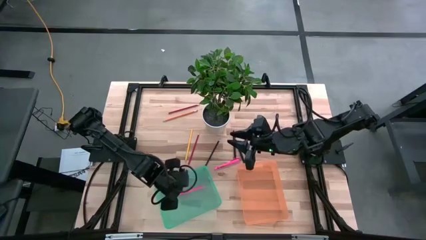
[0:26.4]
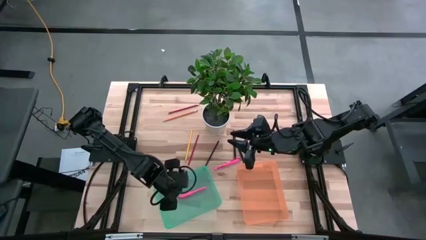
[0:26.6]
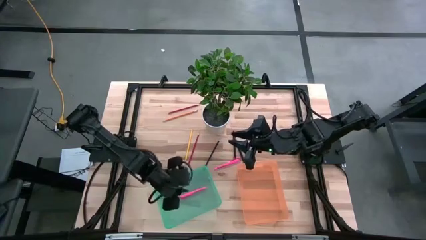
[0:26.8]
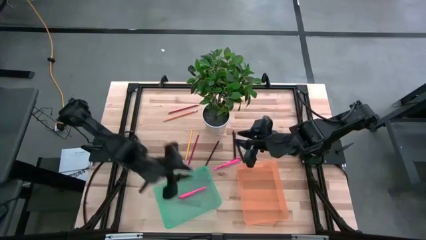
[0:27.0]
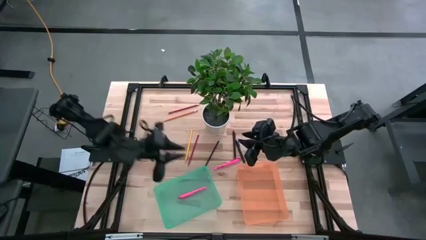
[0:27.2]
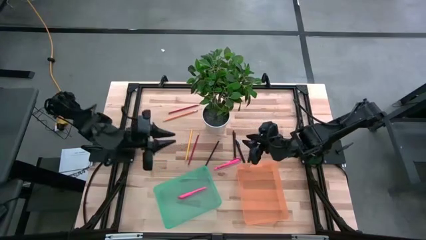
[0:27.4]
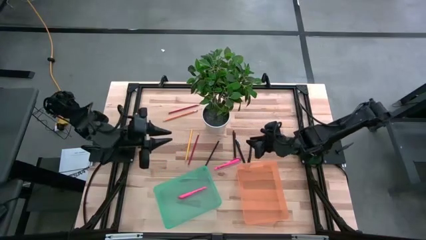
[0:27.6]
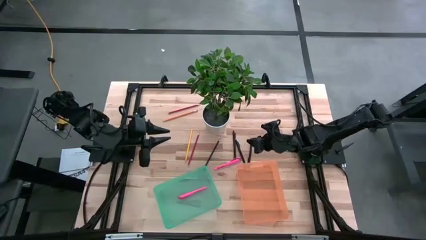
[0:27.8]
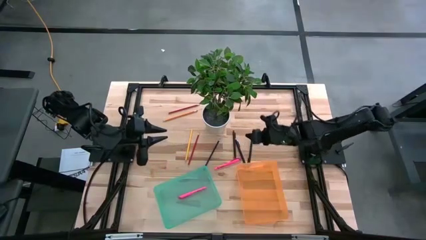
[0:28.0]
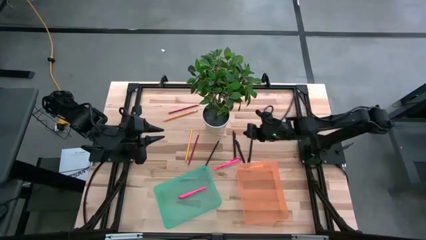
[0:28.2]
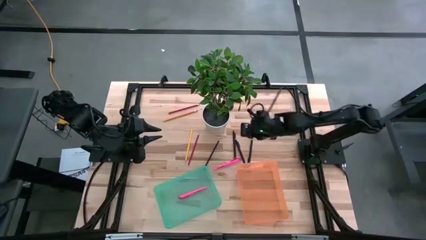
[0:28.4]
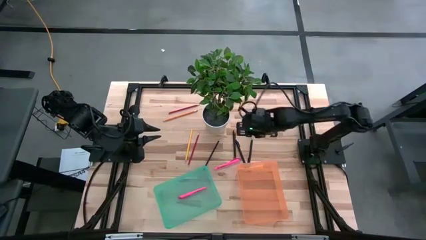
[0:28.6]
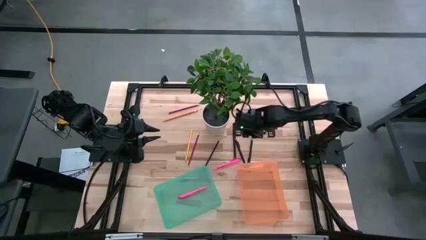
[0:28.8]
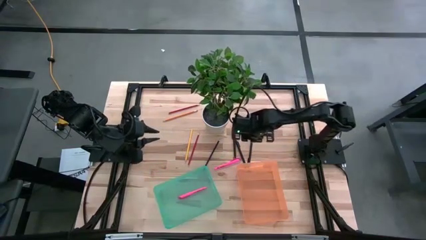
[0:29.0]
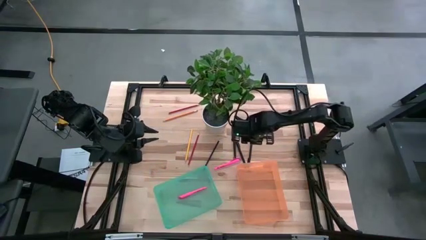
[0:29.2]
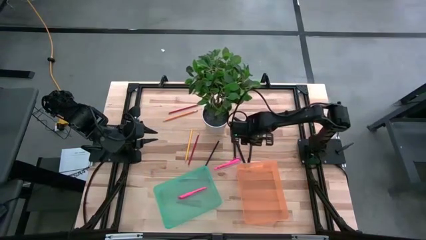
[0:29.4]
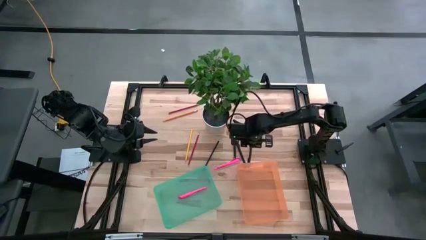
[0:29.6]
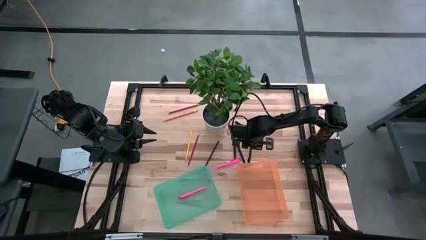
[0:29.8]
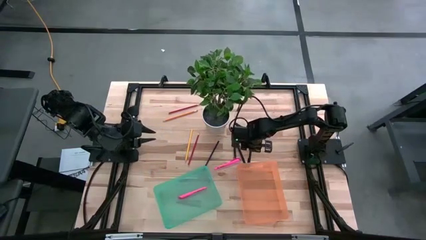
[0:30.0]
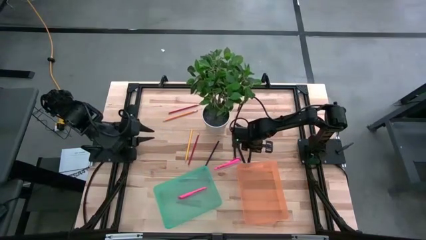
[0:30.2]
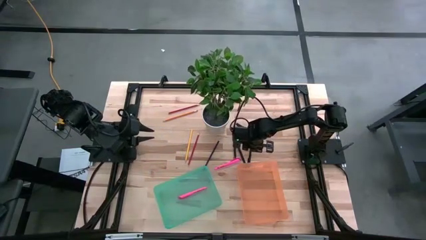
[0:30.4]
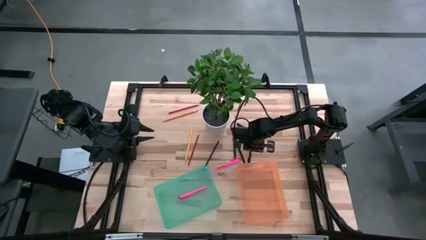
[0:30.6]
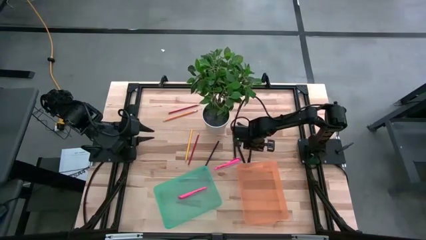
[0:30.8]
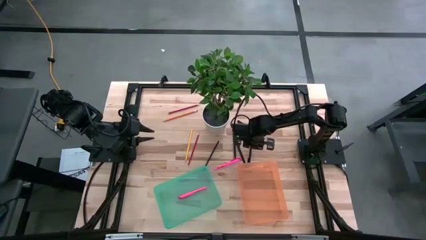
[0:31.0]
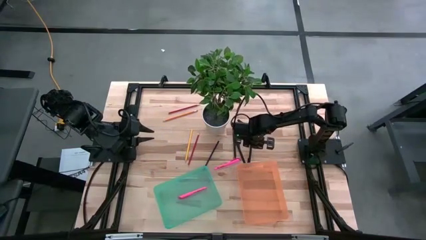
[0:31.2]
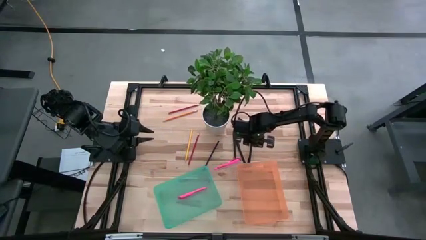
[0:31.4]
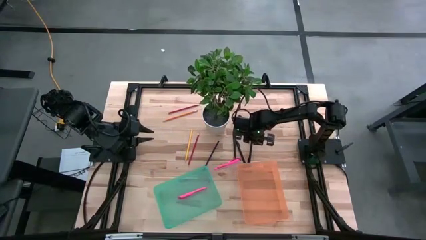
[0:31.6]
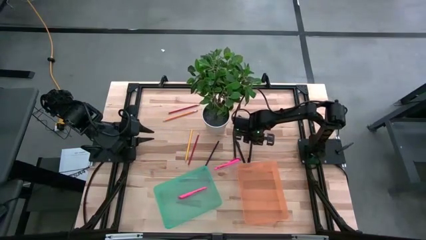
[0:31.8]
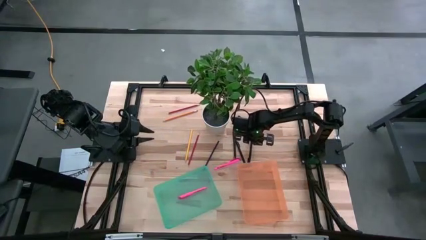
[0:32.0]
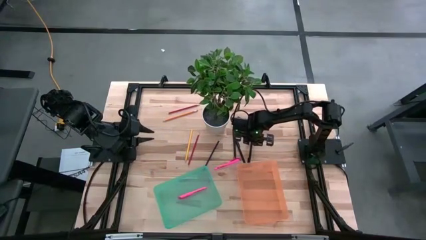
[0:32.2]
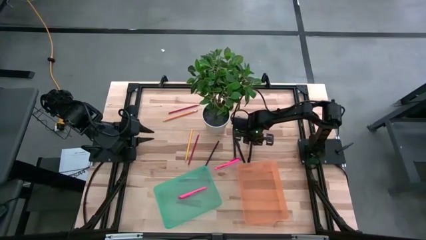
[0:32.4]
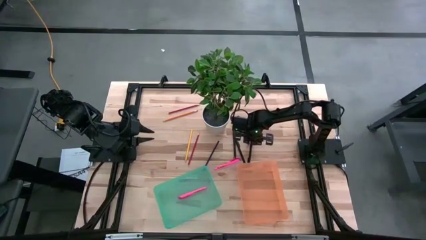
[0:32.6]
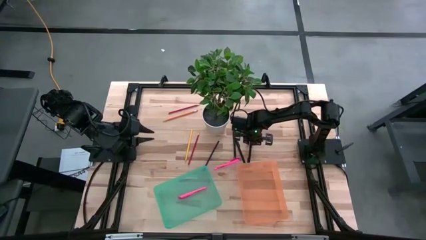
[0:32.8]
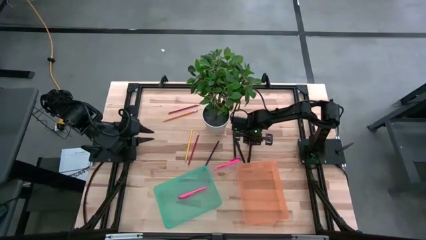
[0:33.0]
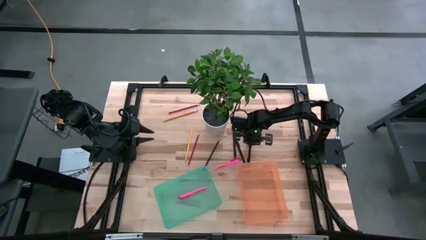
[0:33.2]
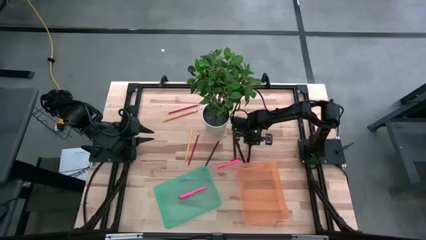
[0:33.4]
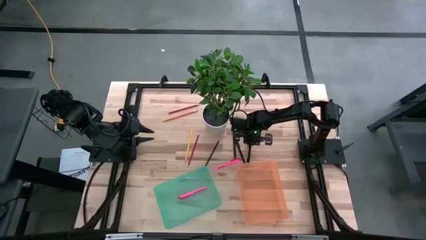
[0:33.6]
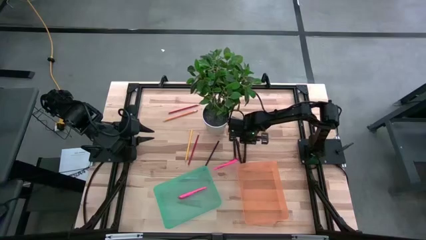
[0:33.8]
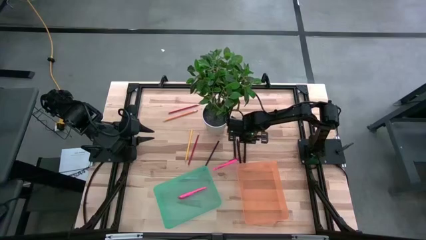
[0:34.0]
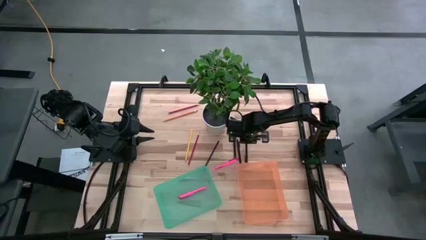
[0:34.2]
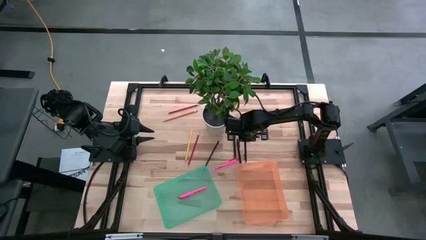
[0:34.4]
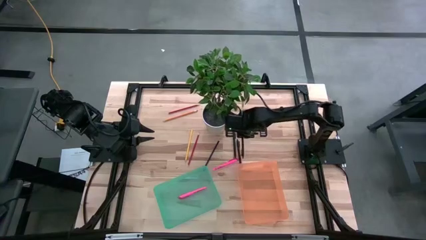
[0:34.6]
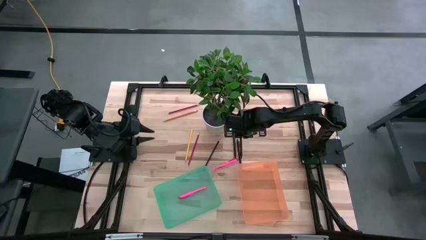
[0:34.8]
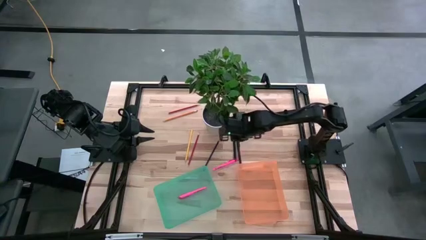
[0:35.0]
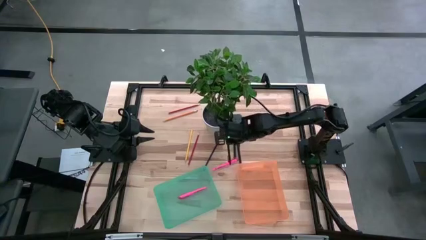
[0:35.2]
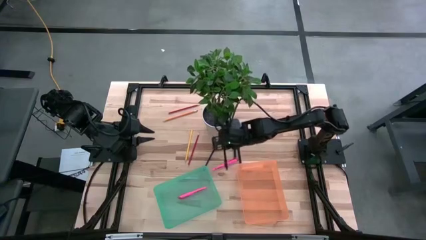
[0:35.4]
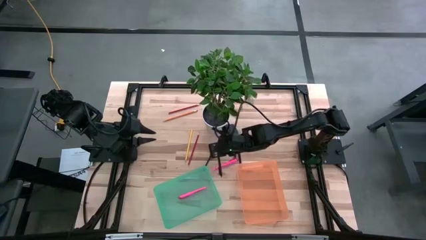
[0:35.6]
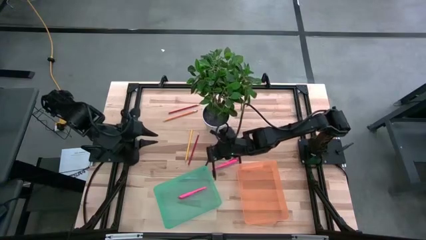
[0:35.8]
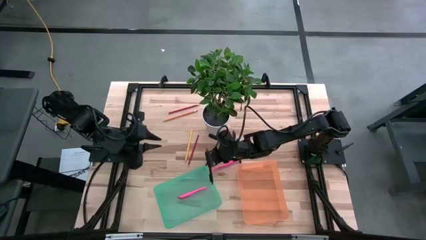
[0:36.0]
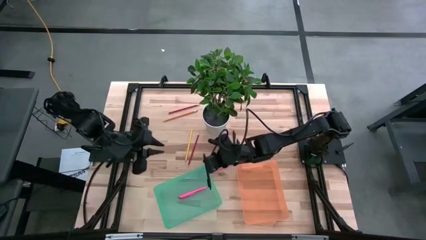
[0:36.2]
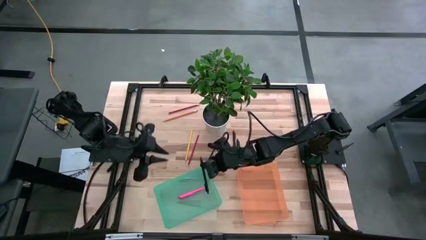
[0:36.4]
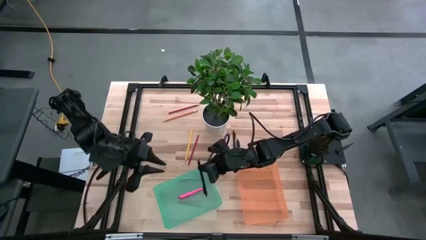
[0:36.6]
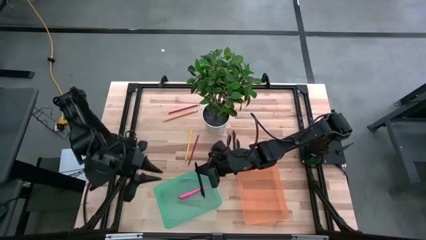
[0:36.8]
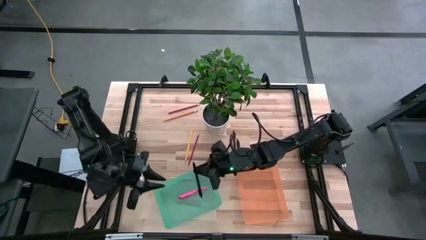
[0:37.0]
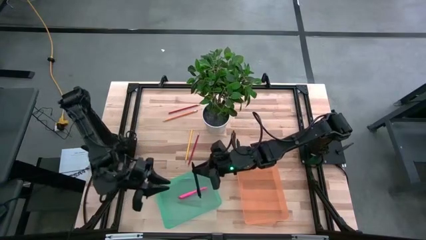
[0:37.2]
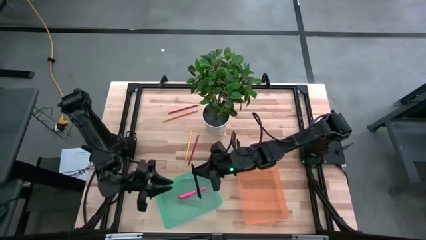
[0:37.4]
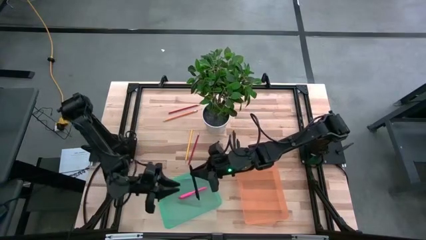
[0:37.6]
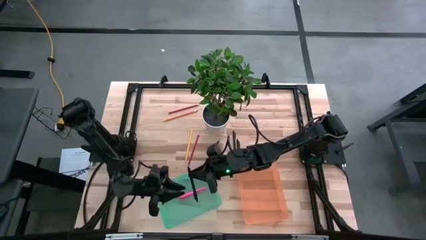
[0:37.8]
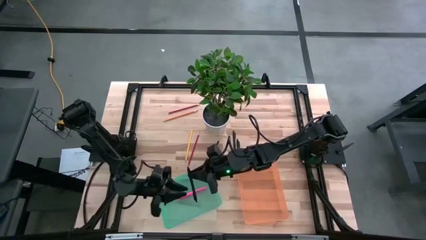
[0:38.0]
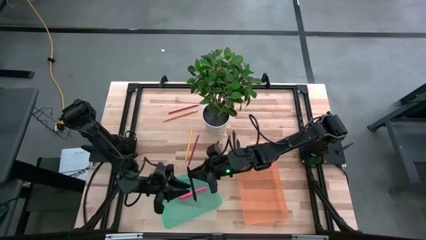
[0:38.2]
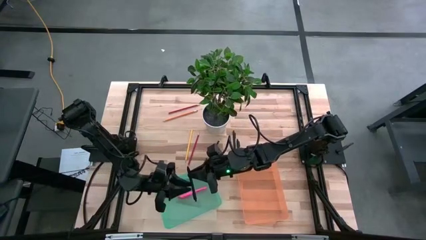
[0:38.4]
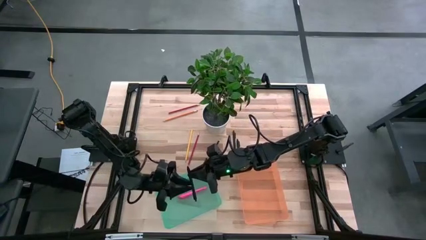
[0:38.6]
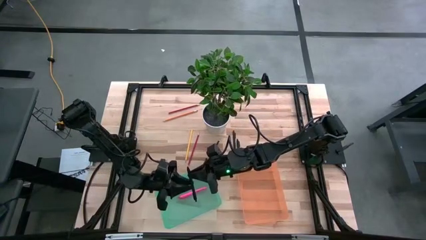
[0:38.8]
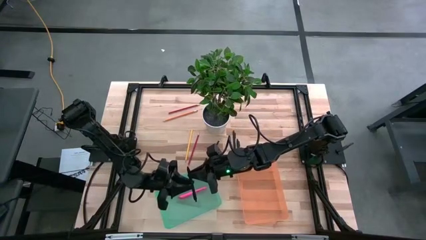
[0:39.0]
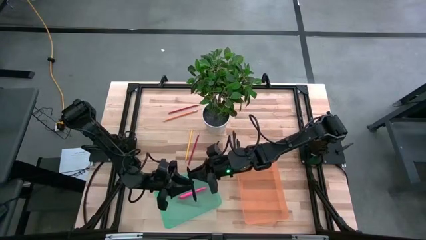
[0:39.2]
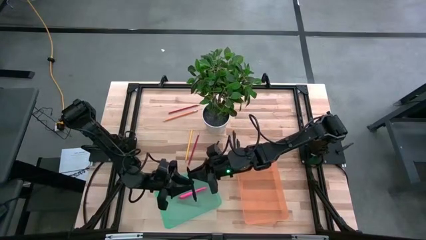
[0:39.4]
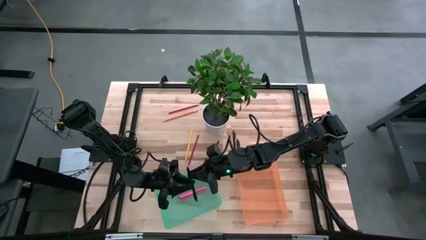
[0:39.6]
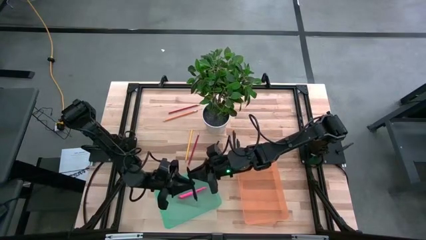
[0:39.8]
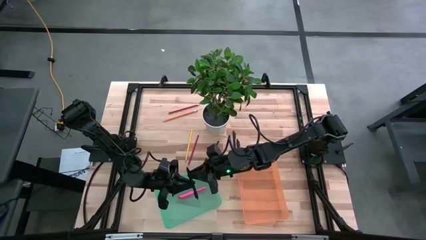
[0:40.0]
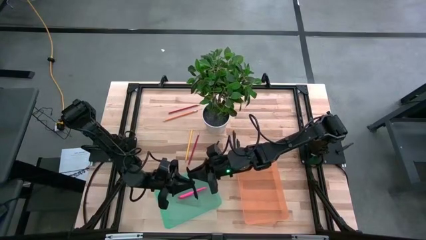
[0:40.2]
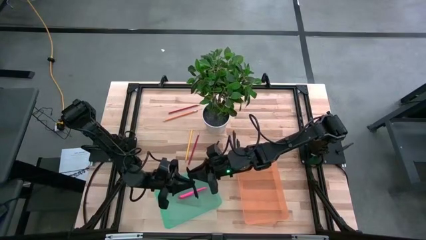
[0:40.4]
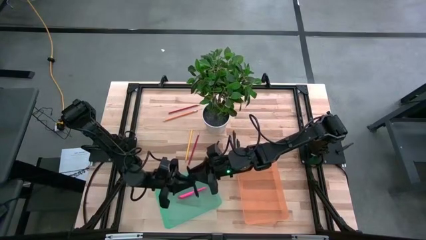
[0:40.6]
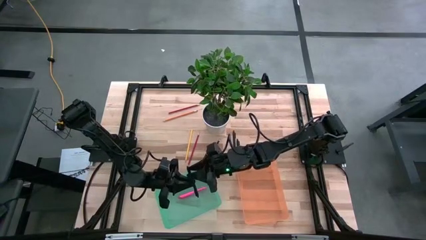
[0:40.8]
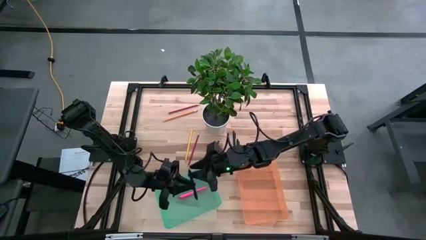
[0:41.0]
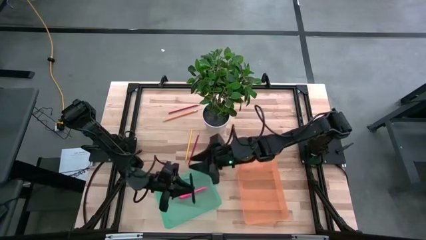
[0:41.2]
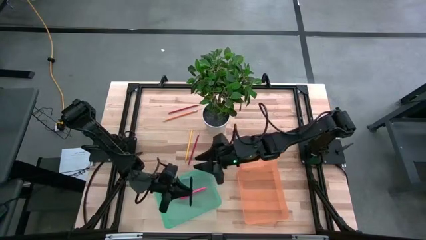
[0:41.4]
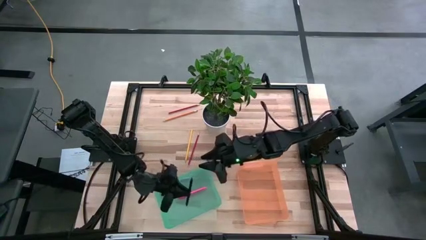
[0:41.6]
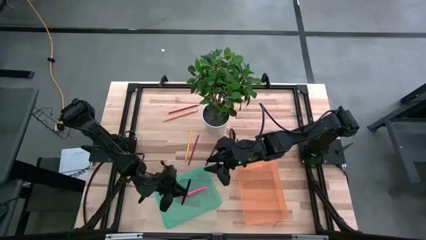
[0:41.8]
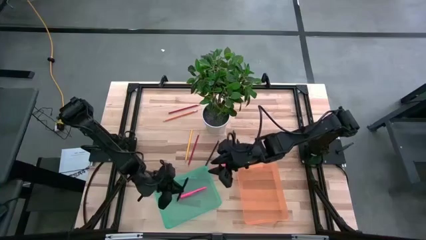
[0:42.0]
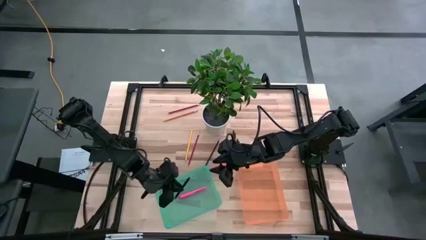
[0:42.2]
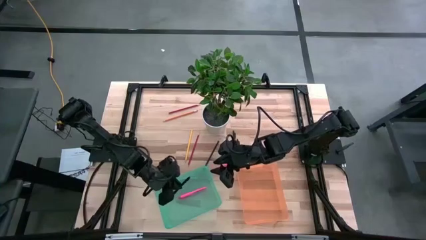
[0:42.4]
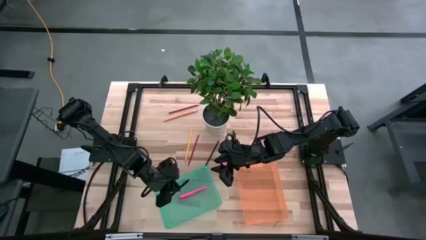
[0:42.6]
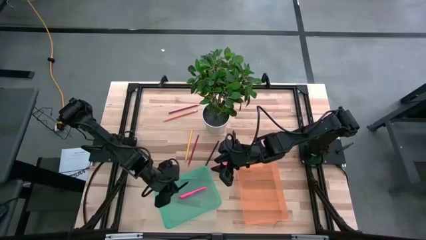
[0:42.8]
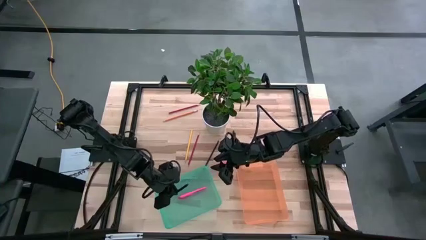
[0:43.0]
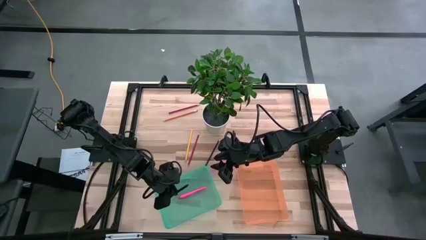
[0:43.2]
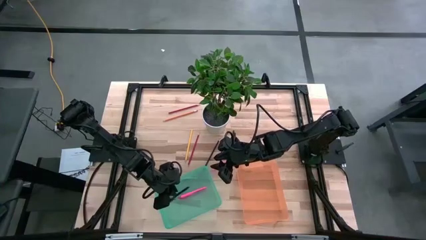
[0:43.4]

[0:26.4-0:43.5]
Task: Sort pens & pencils
Put the bottom right black pen into the green bin
